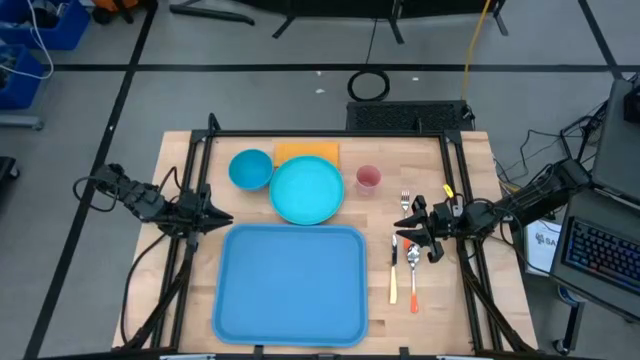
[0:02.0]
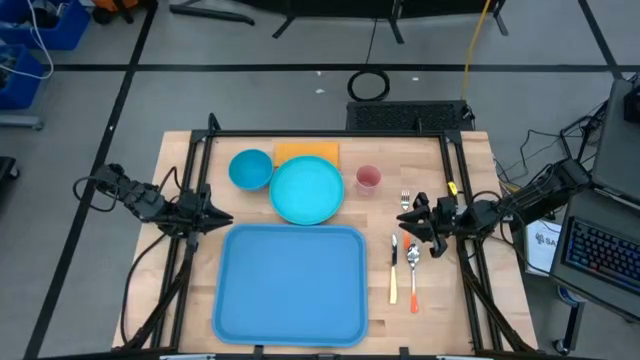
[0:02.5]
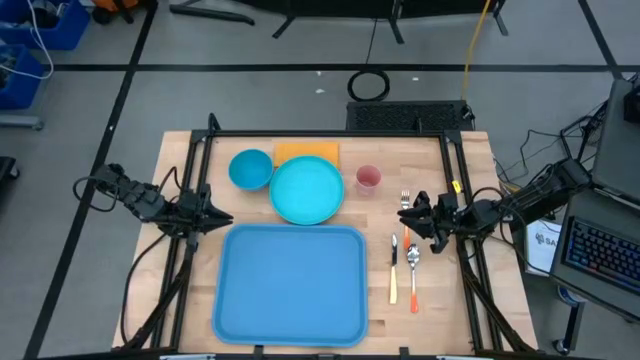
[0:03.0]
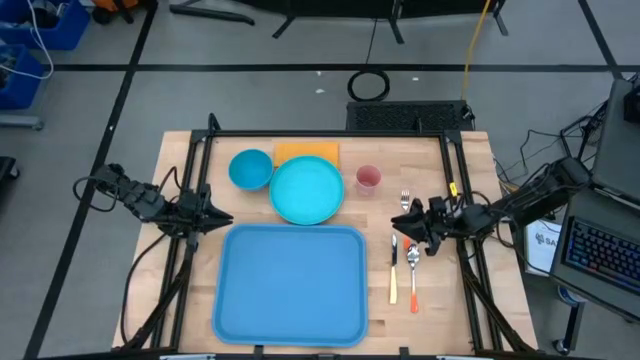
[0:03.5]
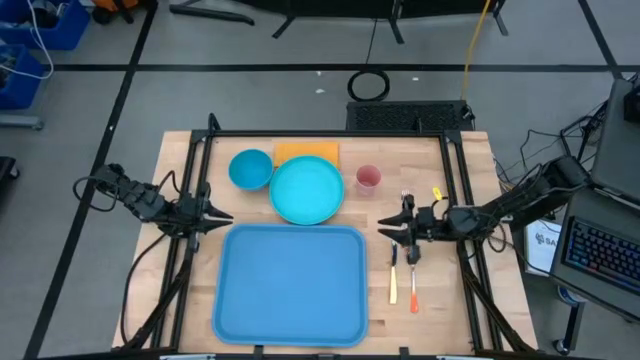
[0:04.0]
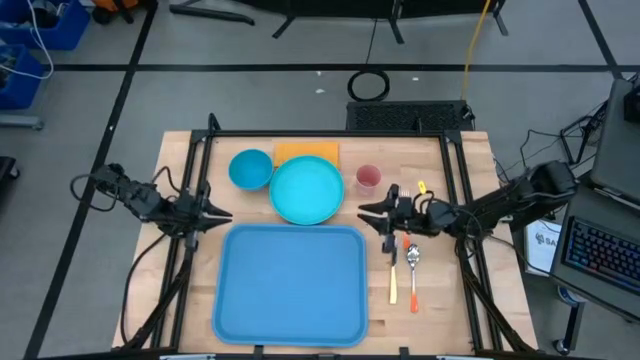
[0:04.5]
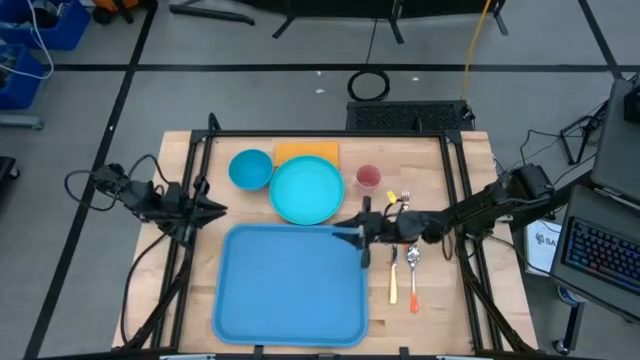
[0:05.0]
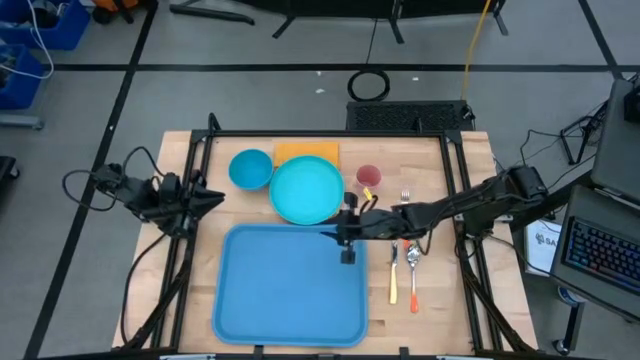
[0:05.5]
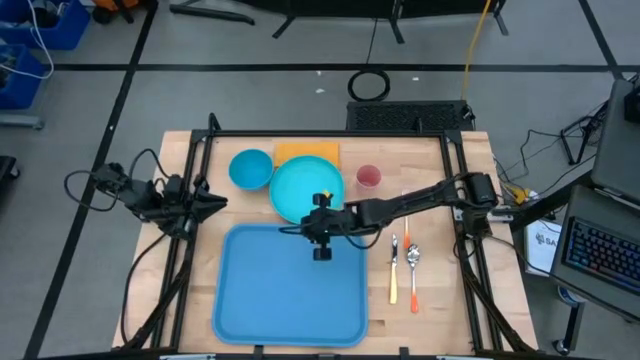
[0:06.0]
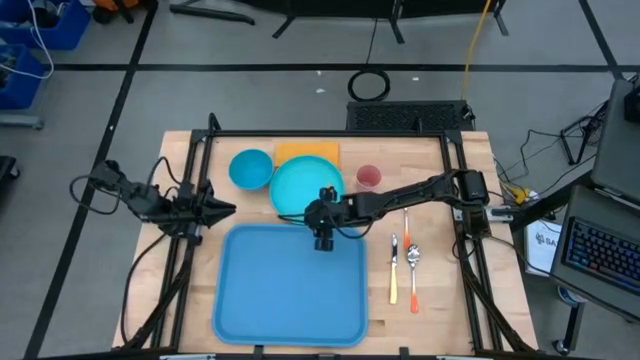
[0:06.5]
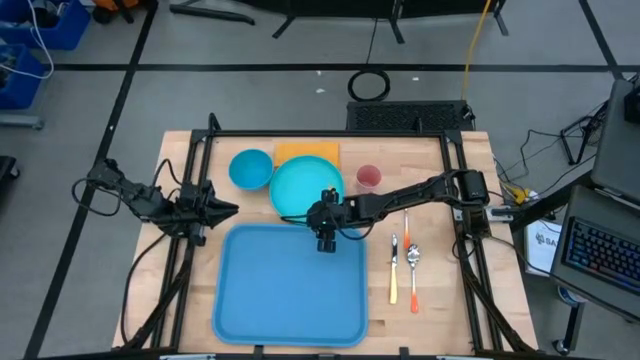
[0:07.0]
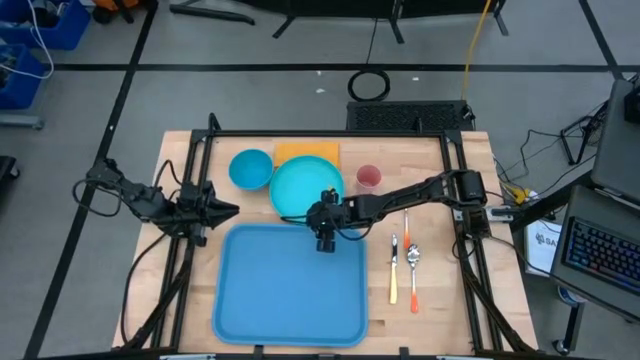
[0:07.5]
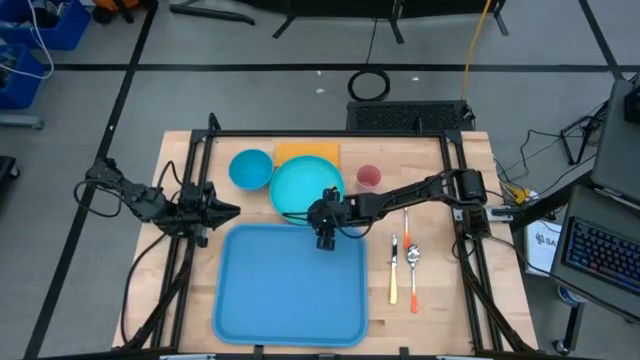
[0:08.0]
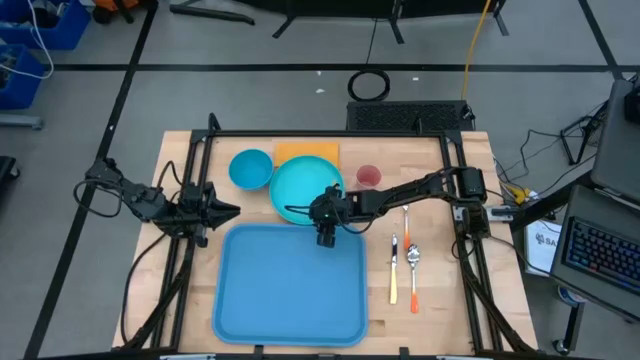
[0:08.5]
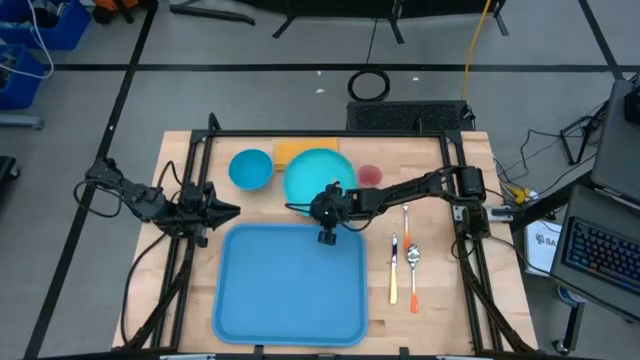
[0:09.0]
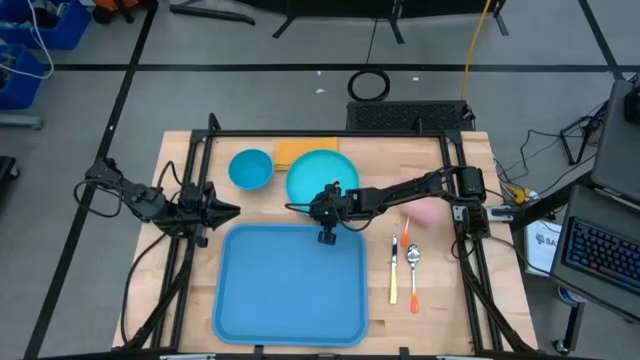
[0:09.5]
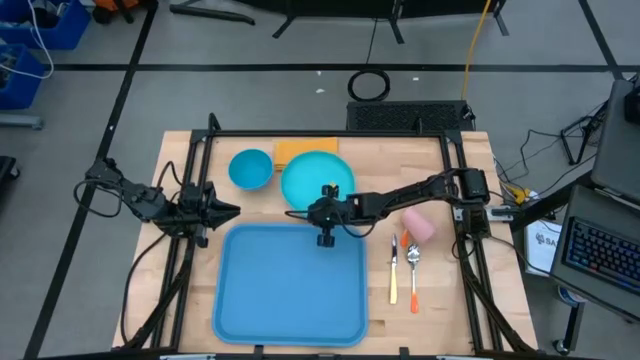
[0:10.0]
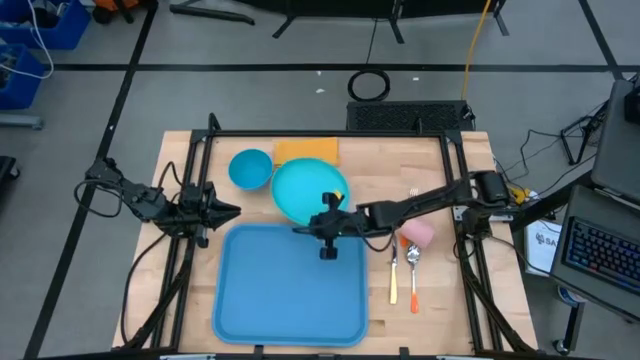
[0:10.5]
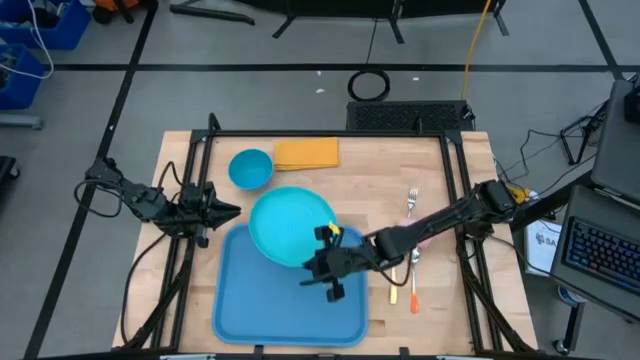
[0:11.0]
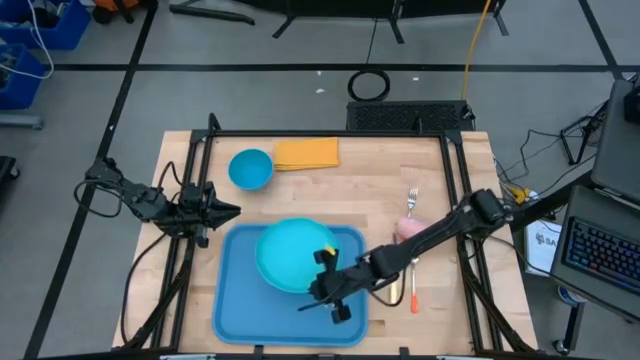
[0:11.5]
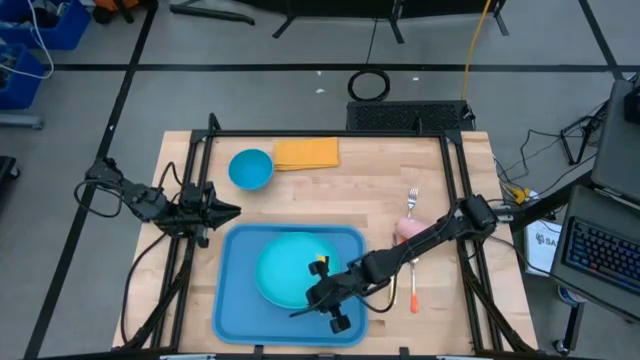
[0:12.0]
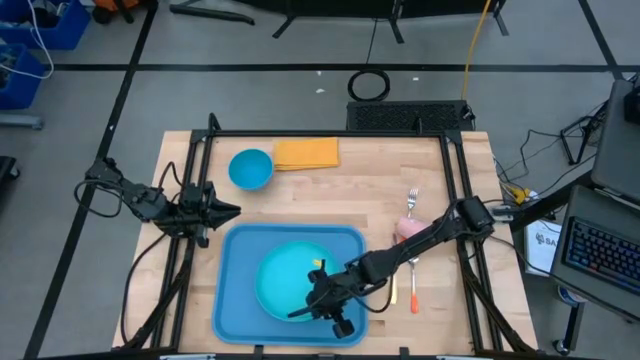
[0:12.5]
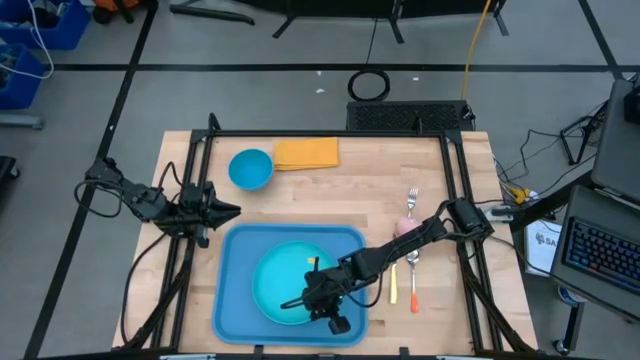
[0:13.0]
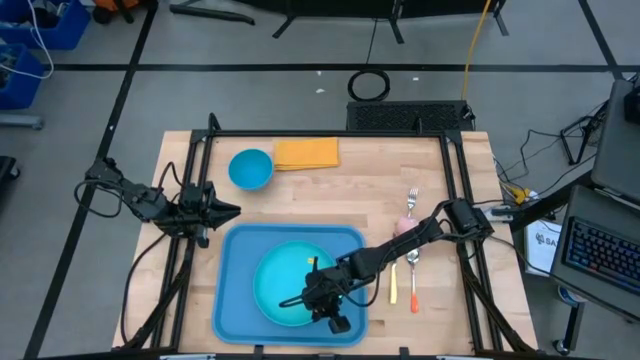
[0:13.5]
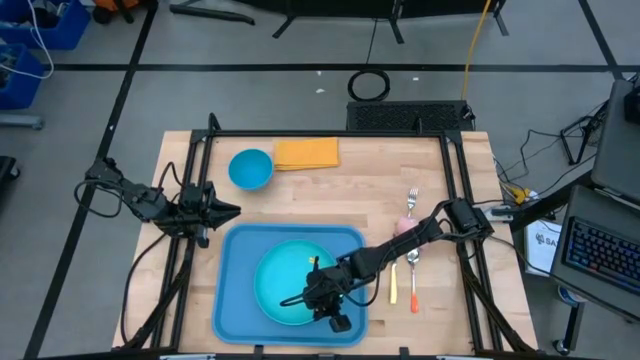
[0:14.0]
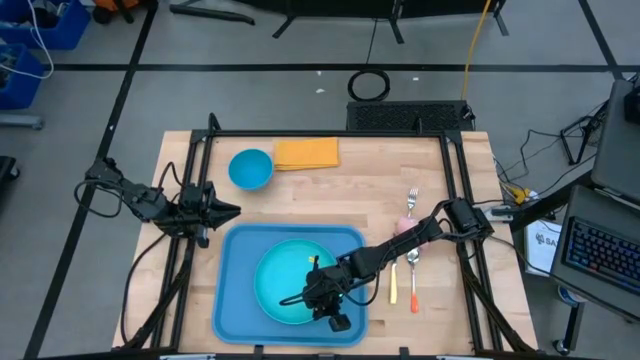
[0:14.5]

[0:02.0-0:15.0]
Task: Set up tray
Put the green plate on the blue tray
